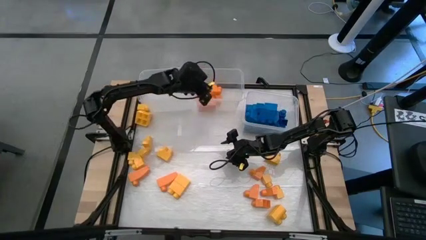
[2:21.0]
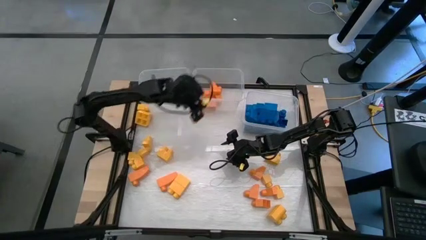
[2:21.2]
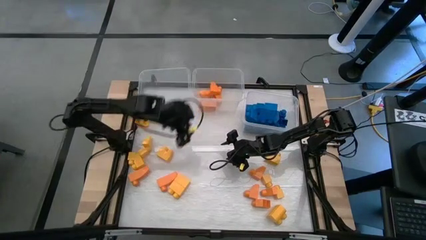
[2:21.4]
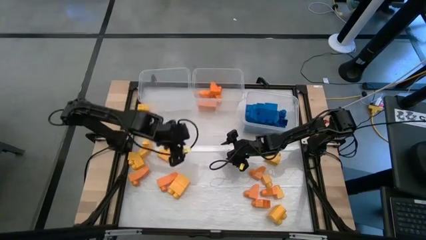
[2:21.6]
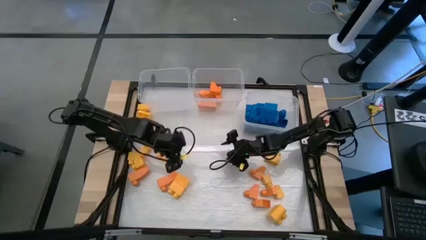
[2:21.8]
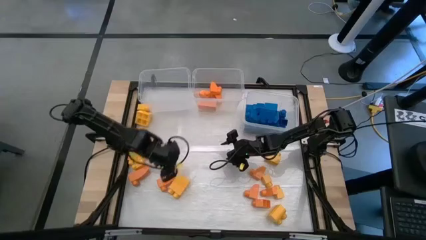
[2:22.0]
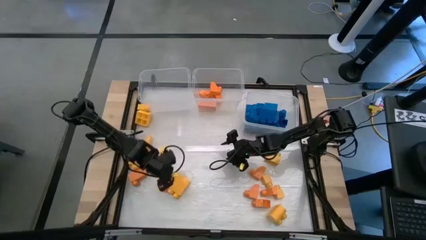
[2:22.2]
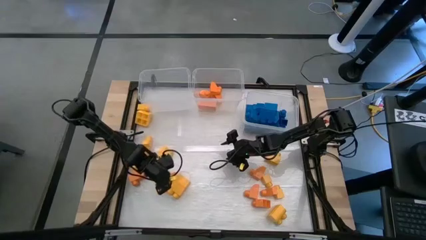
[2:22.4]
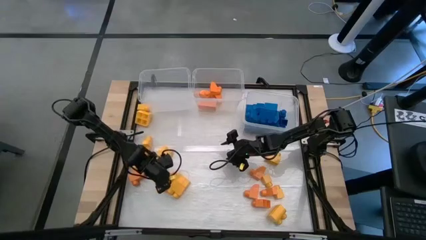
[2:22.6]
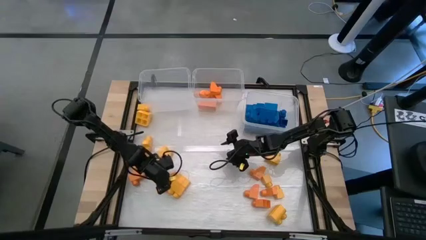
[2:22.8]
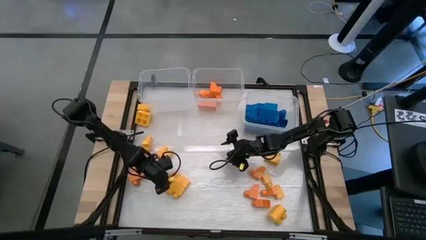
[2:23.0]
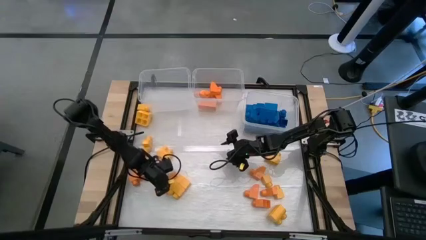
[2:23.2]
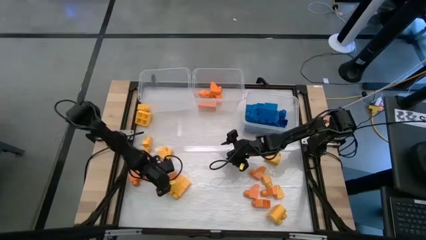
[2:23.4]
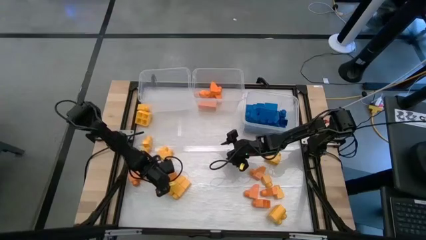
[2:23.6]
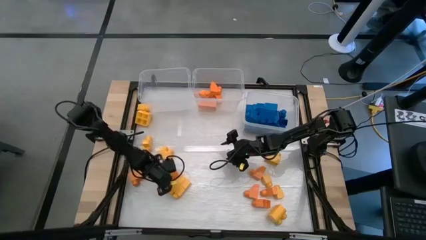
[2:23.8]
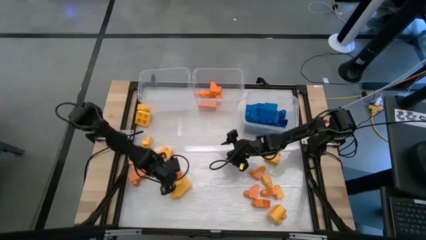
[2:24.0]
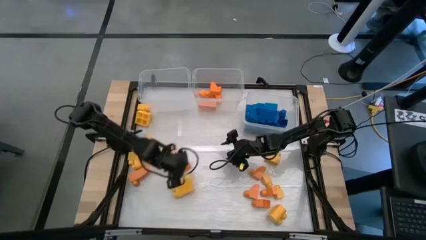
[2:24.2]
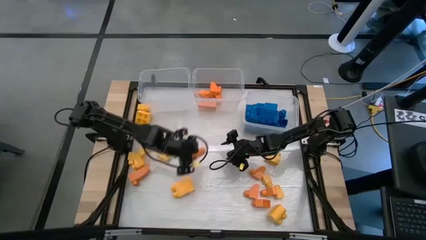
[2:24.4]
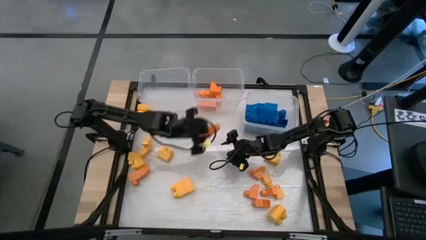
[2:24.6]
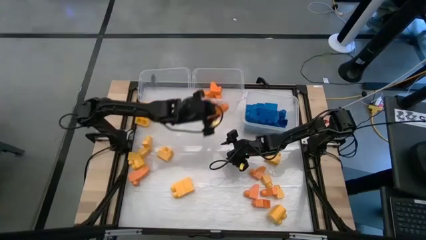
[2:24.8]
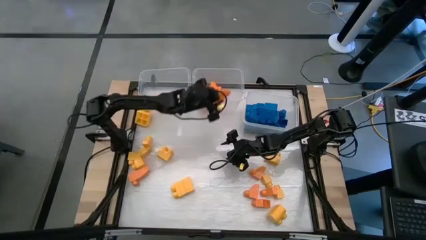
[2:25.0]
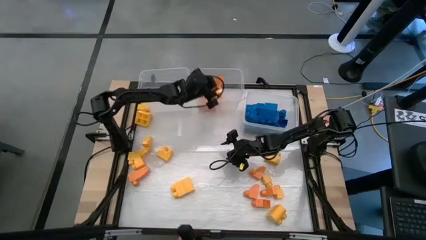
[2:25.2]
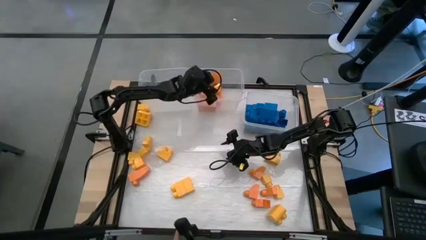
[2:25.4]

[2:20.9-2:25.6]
Task: Sort blocks
Put the orange game piece into the middle transparent bin

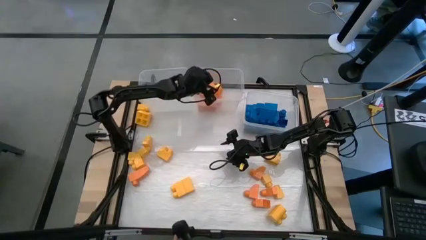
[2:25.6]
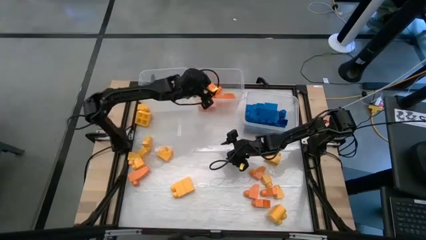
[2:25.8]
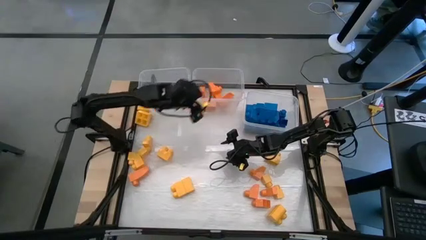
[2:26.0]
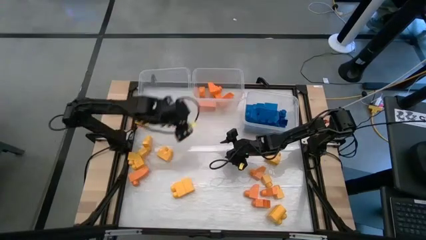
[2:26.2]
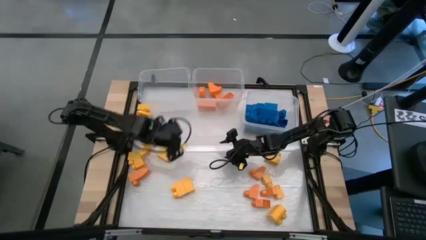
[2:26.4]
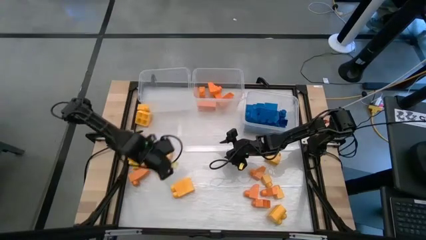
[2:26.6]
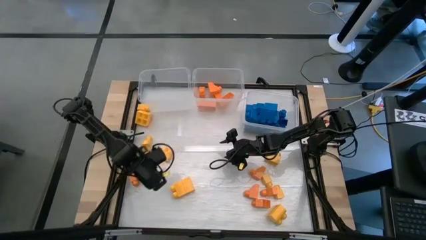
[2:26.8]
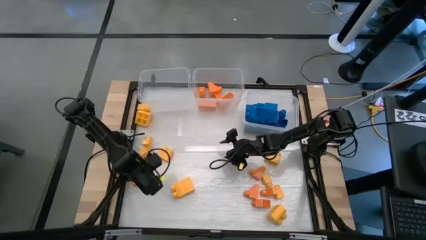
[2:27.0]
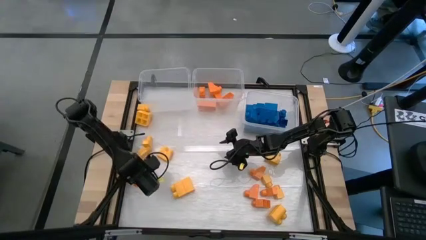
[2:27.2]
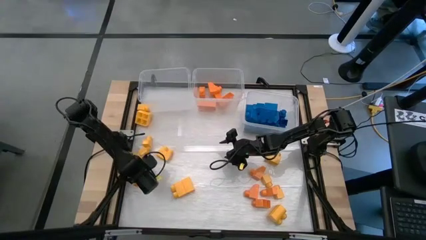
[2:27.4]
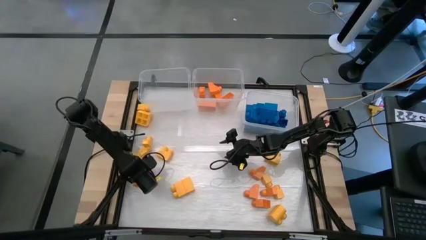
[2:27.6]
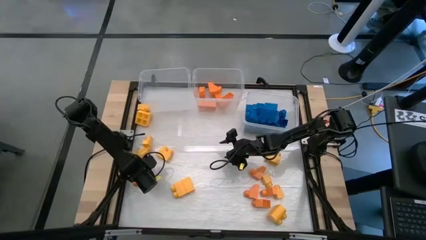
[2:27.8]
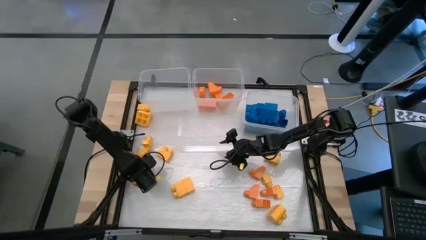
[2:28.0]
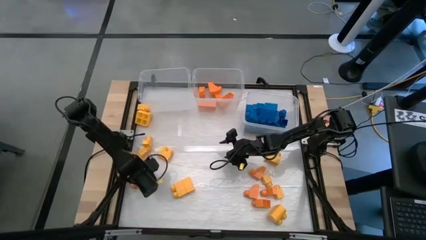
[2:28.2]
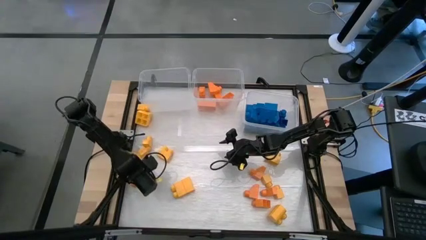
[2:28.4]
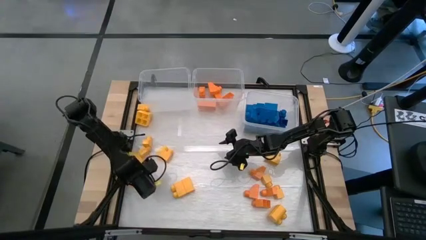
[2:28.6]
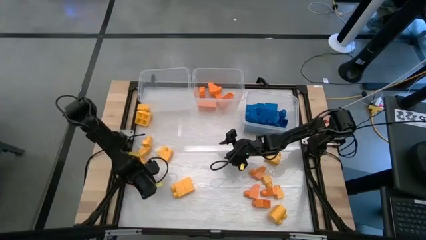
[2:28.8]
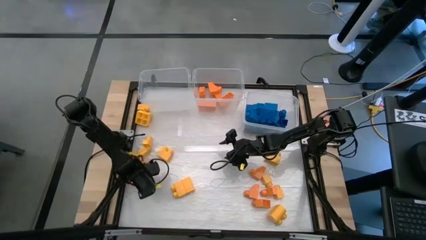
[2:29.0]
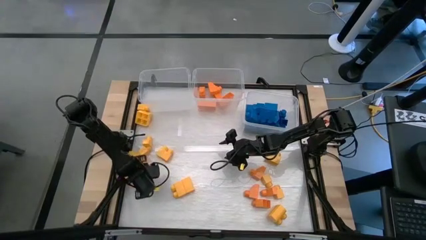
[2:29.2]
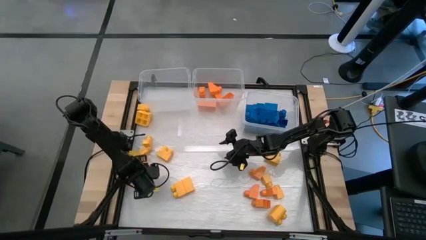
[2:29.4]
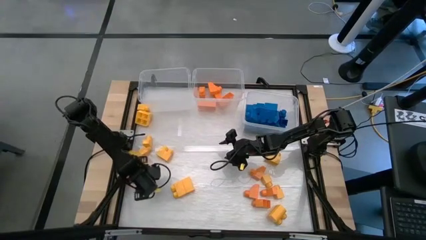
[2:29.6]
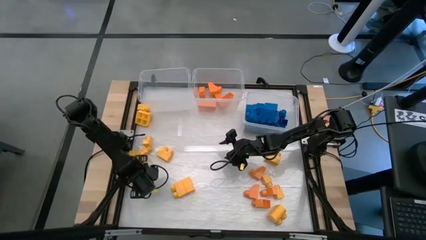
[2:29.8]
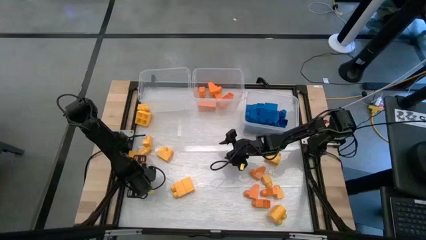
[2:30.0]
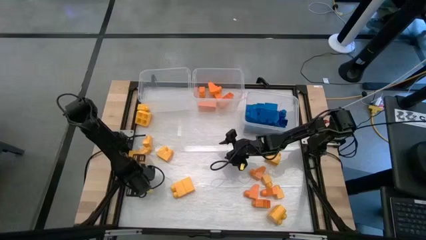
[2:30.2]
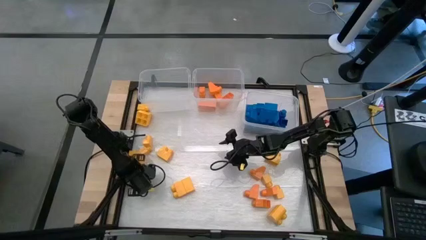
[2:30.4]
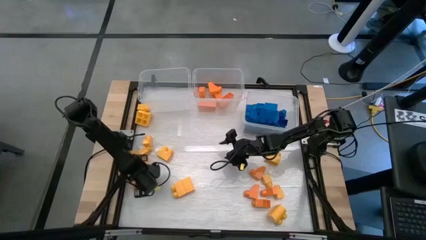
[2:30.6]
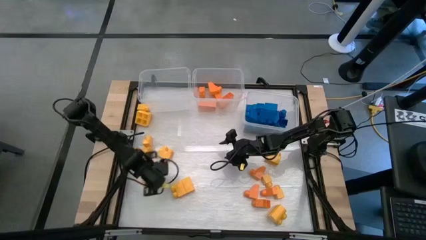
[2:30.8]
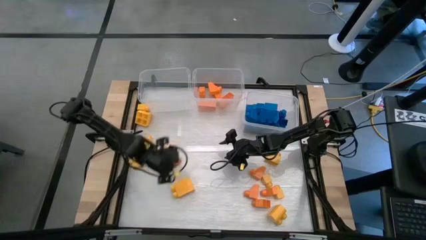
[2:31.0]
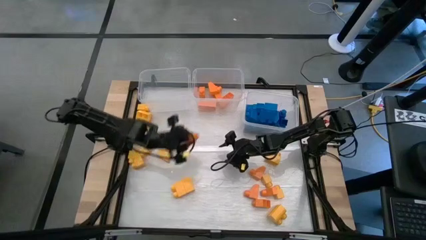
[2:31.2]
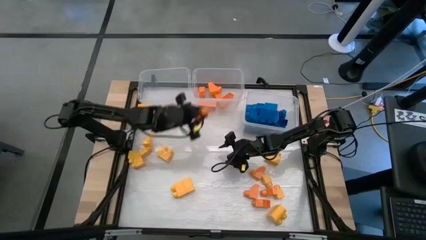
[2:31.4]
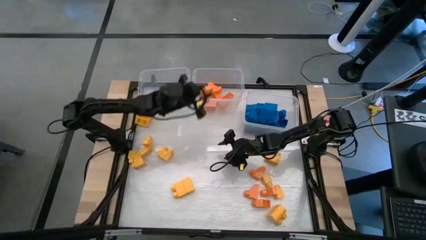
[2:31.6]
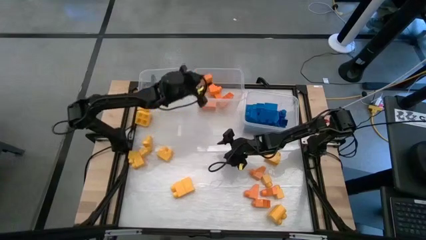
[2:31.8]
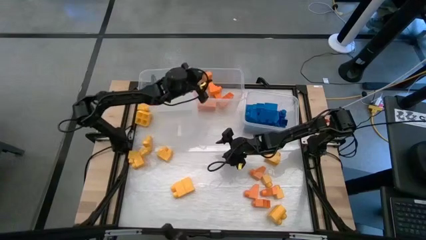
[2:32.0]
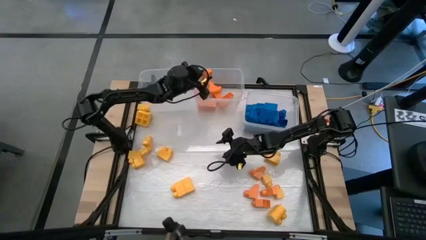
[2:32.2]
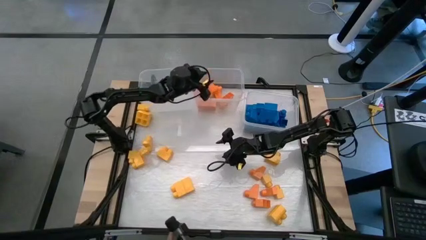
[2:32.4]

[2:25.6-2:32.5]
Put the orange game piece into the middle transparent bin

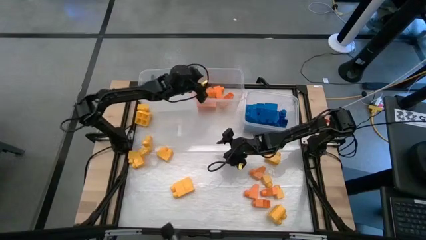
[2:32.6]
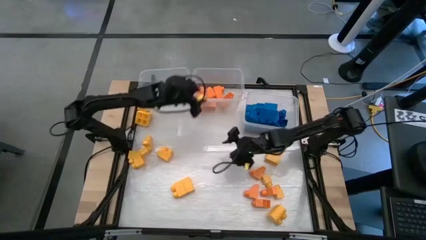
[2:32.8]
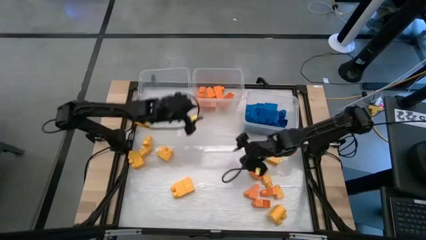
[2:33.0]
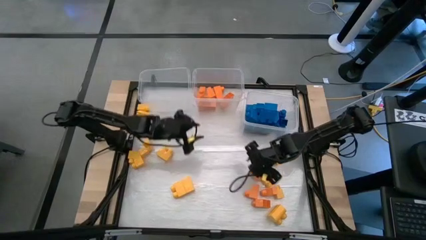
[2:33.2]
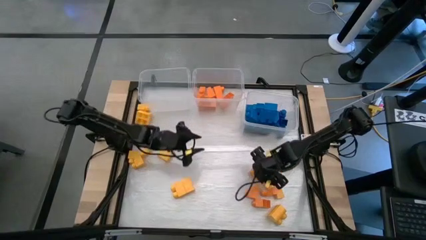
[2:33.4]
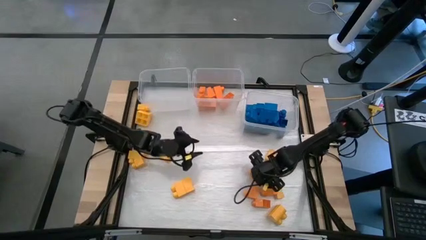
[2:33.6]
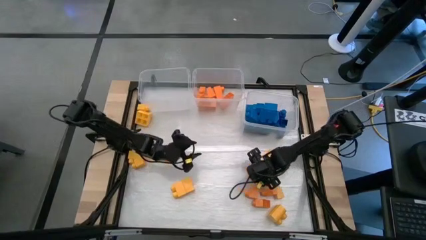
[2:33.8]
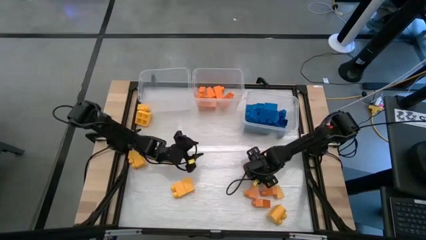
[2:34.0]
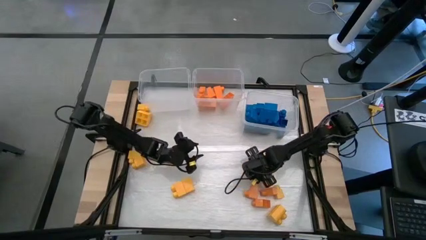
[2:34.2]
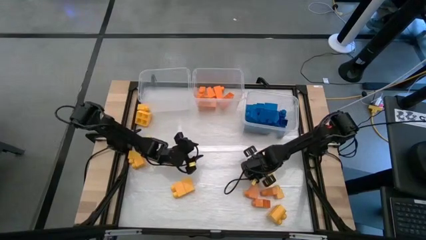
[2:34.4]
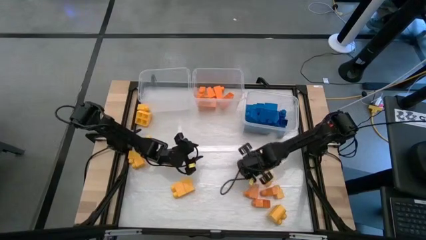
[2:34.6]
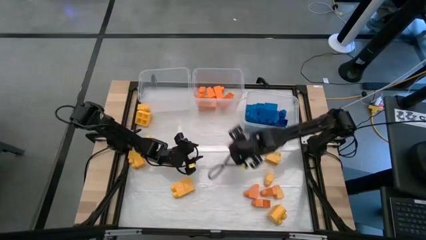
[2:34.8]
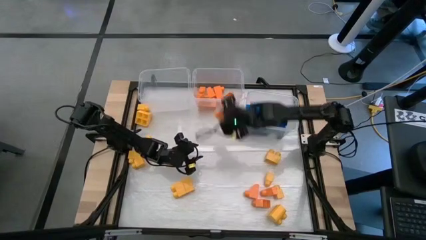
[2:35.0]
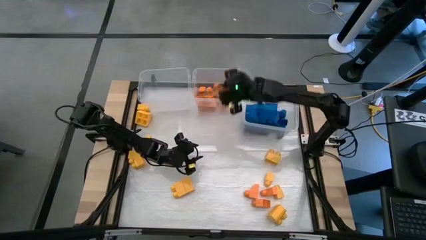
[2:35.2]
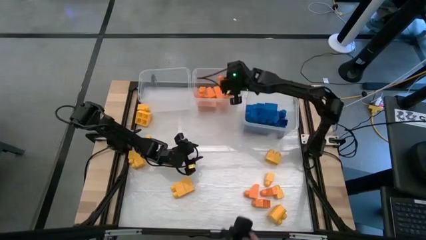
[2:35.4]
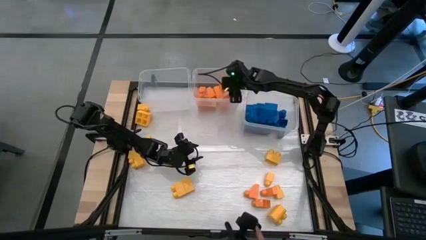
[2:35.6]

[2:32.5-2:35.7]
Put the orange game piece into the middle transparent bin

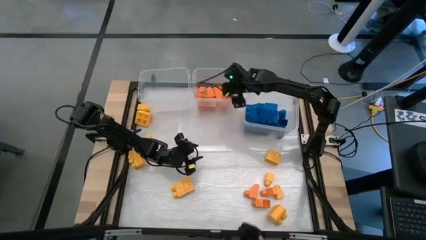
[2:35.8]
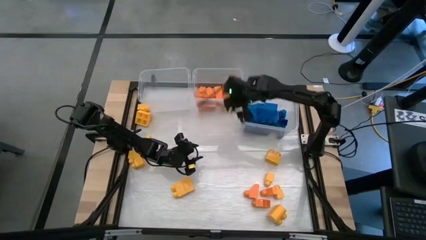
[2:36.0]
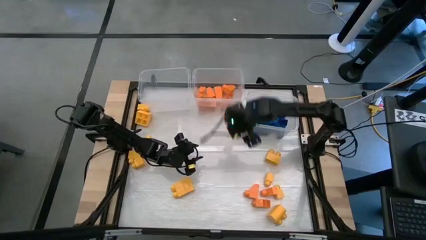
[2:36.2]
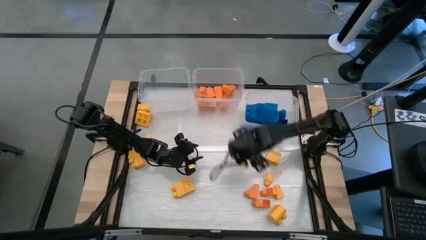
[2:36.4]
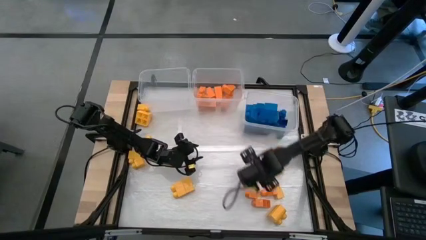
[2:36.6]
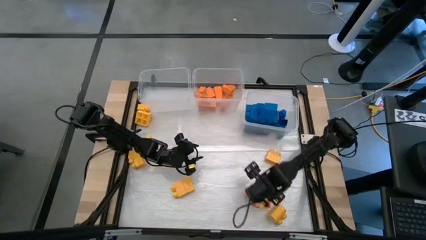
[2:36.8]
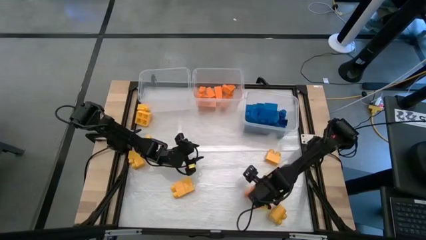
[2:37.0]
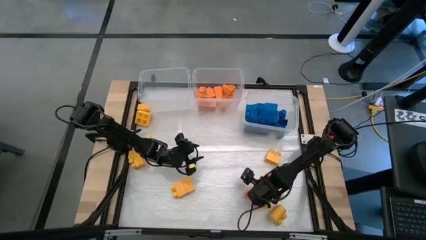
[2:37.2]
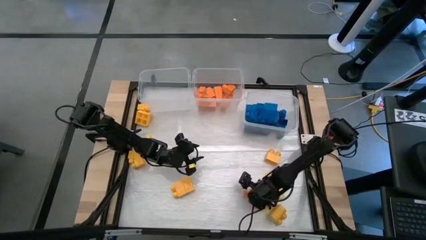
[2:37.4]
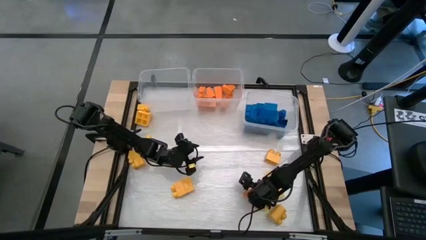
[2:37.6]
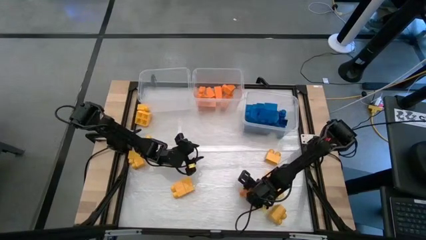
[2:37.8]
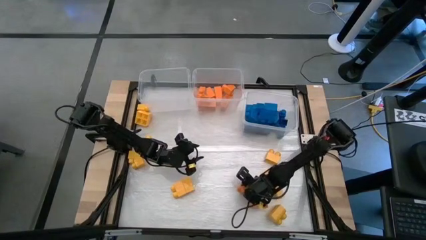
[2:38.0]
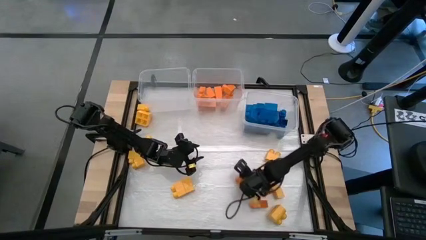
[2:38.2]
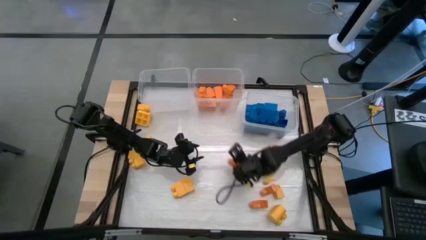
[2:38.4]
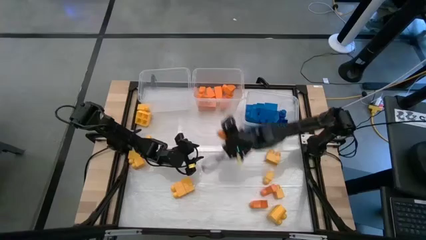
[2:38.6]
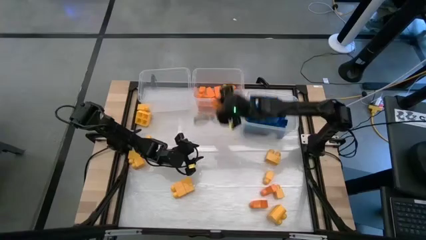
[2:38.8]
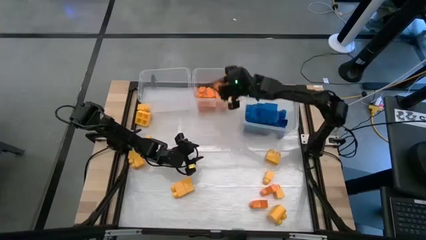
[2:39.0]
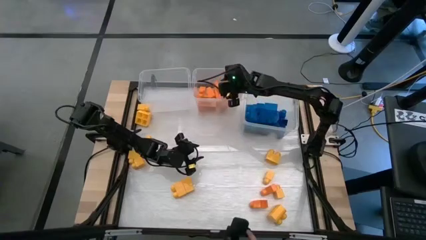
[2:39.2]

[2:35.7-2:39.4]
Put the orange game piece into the middle transparent bin
